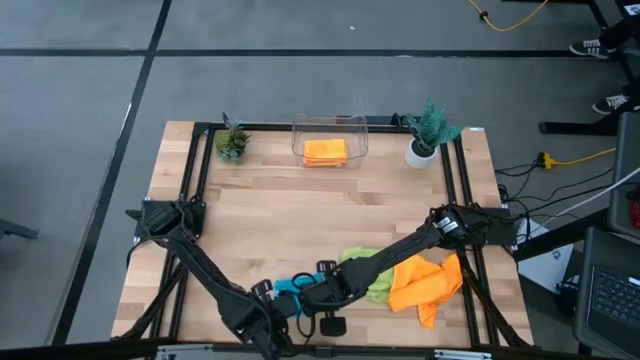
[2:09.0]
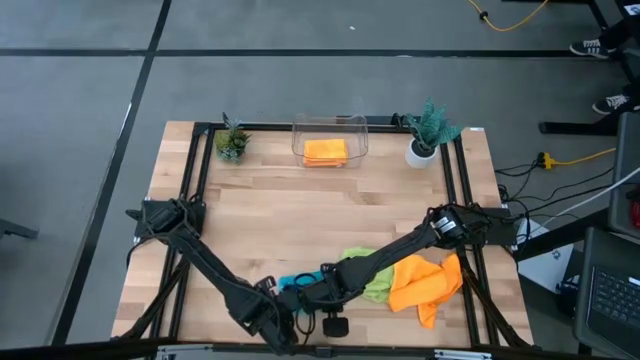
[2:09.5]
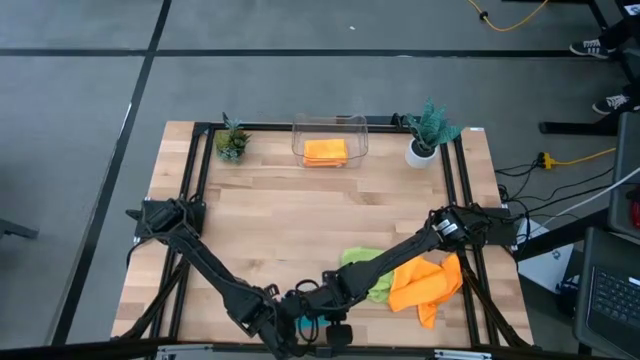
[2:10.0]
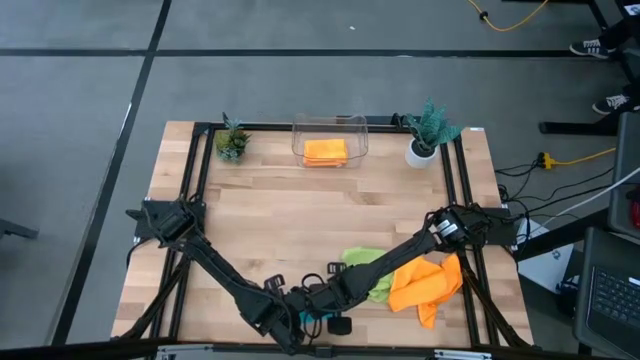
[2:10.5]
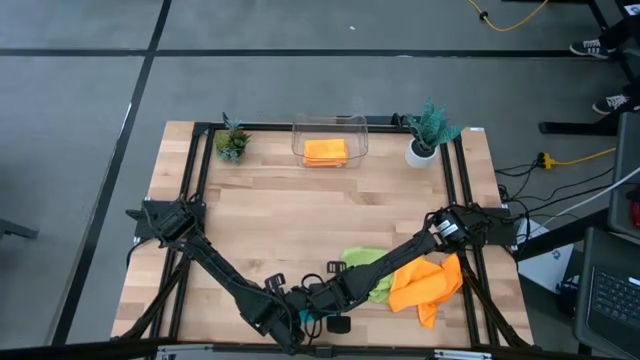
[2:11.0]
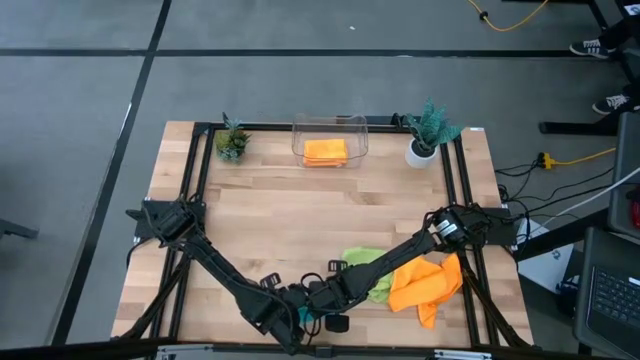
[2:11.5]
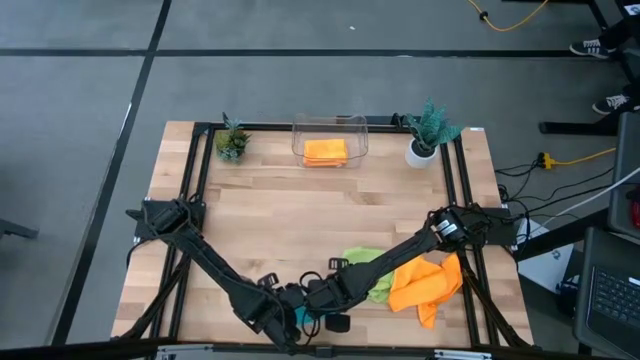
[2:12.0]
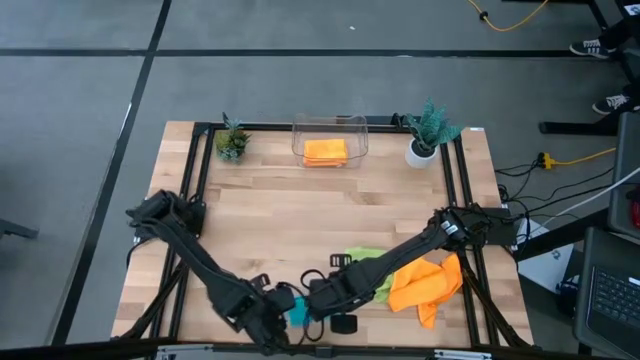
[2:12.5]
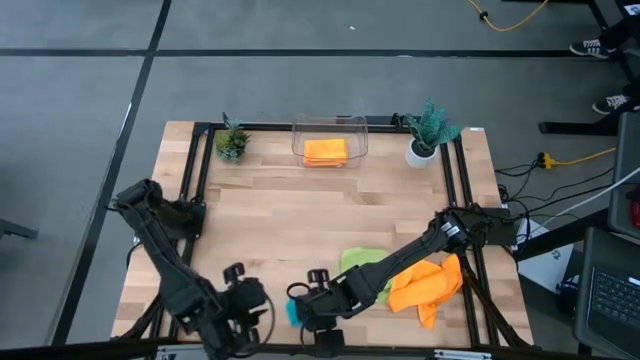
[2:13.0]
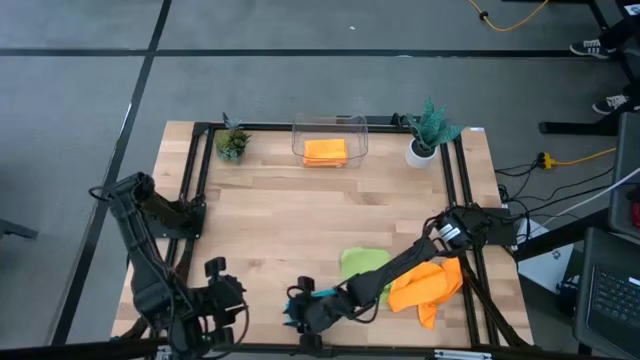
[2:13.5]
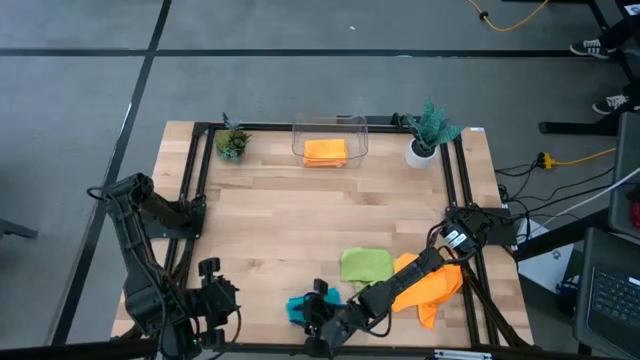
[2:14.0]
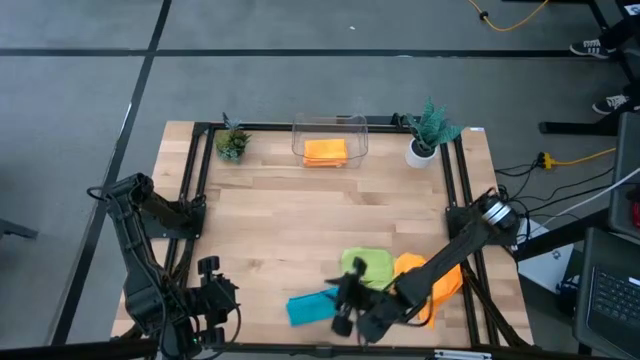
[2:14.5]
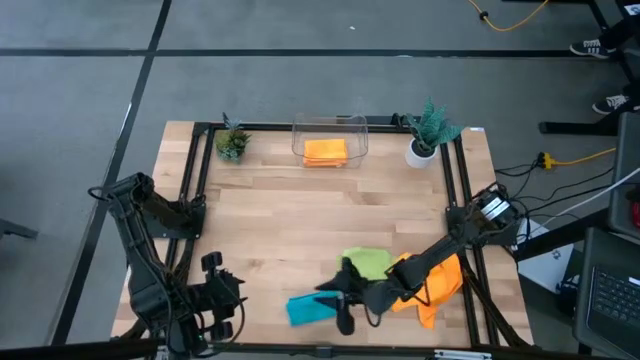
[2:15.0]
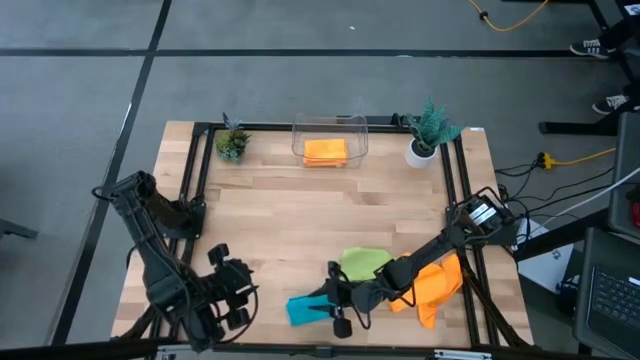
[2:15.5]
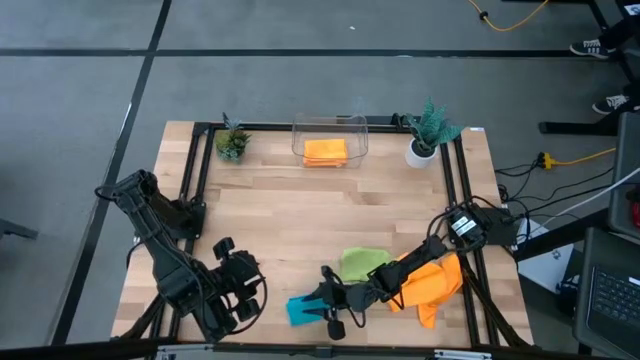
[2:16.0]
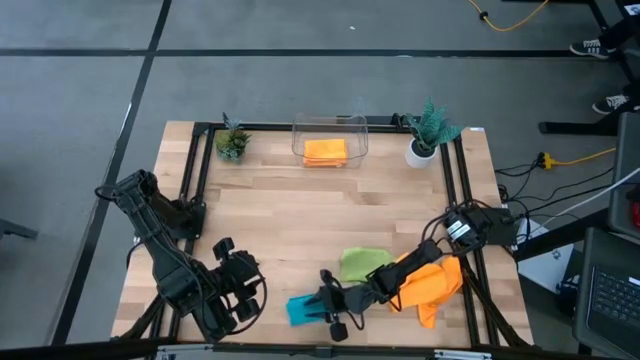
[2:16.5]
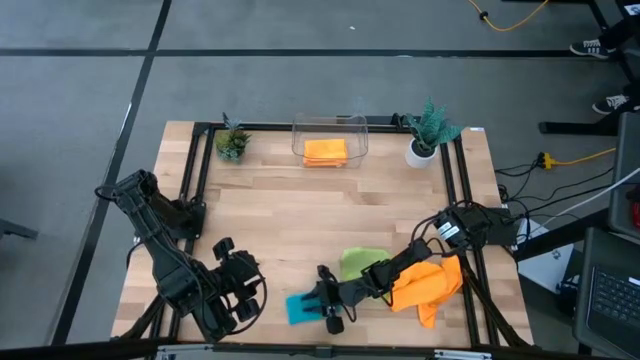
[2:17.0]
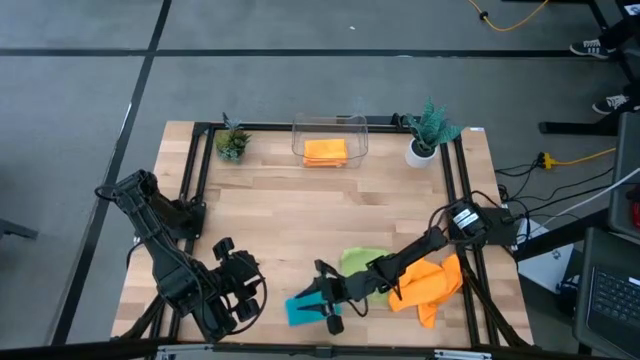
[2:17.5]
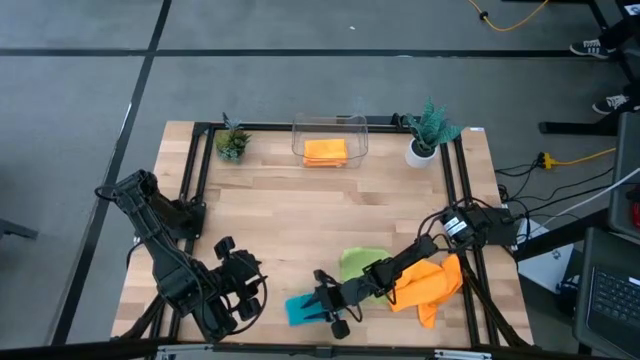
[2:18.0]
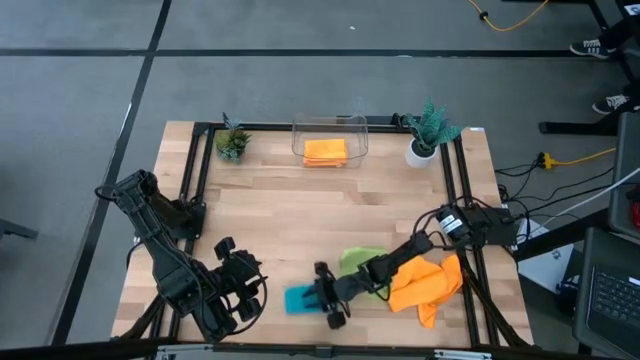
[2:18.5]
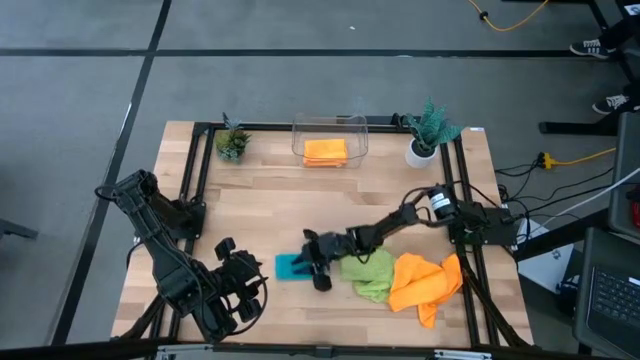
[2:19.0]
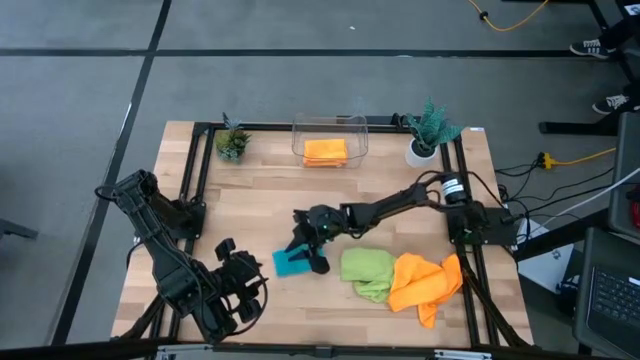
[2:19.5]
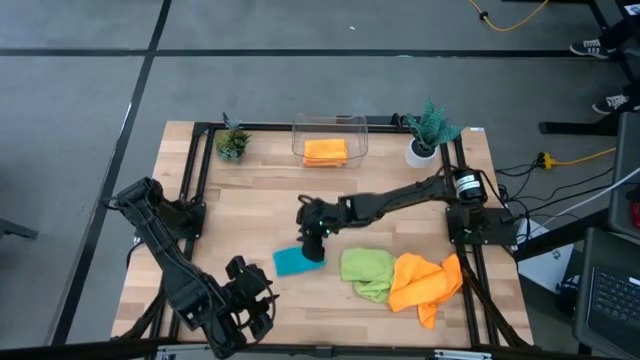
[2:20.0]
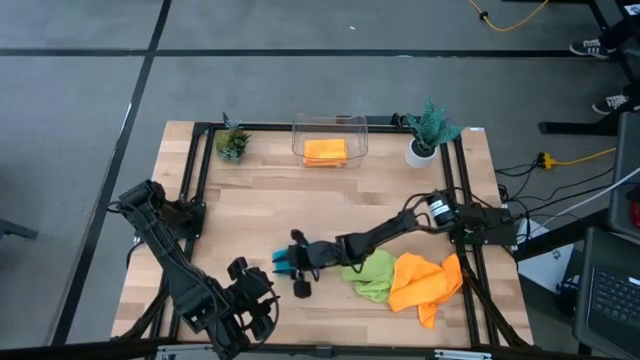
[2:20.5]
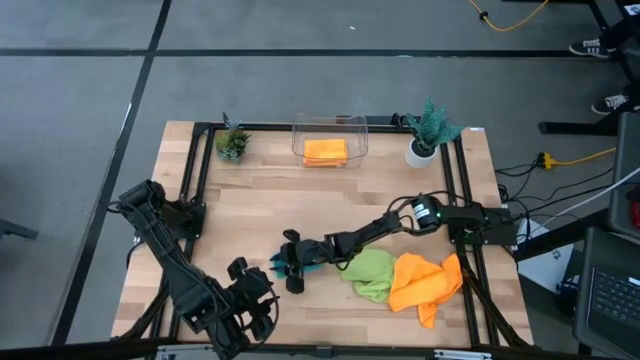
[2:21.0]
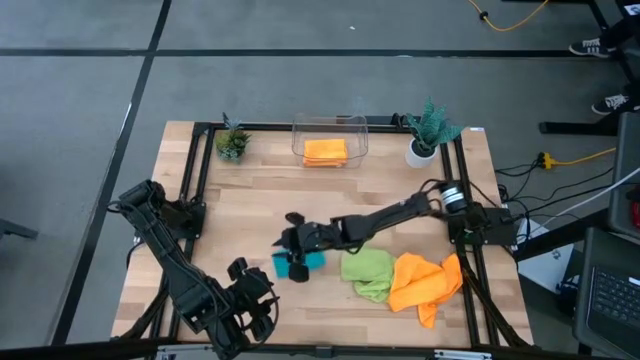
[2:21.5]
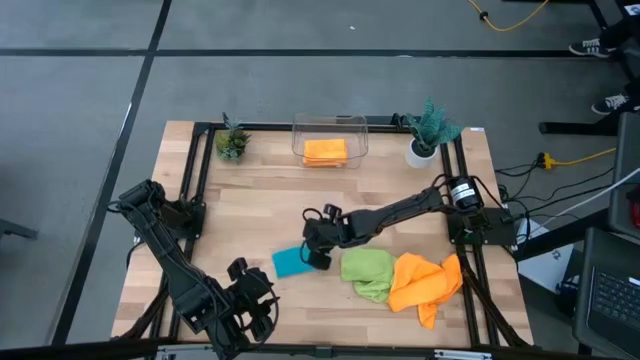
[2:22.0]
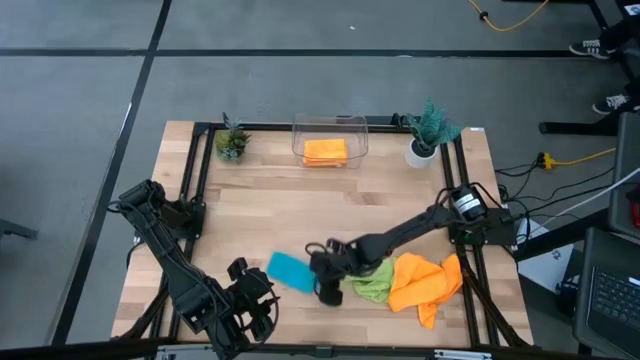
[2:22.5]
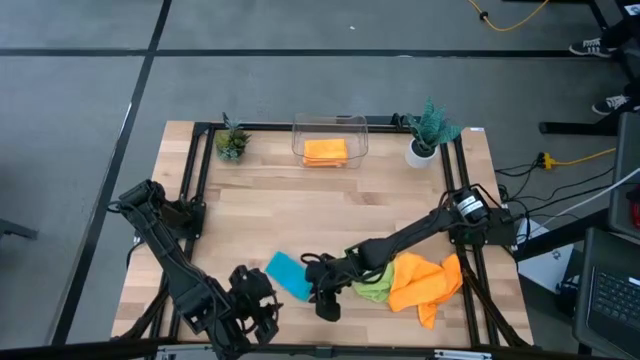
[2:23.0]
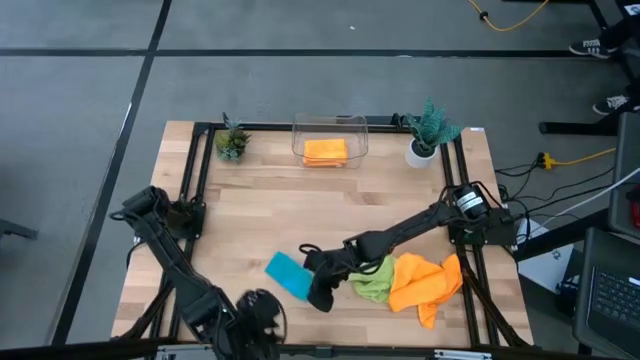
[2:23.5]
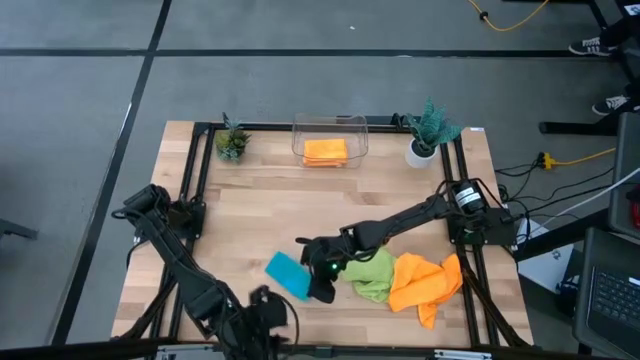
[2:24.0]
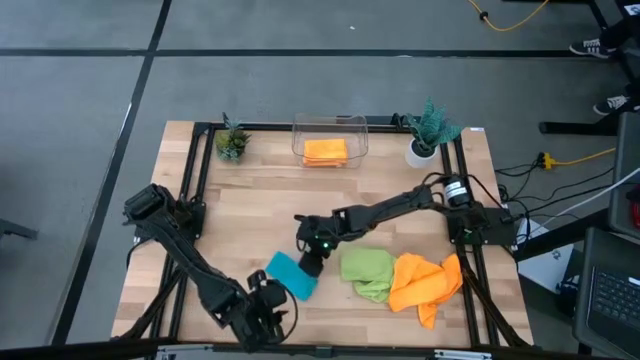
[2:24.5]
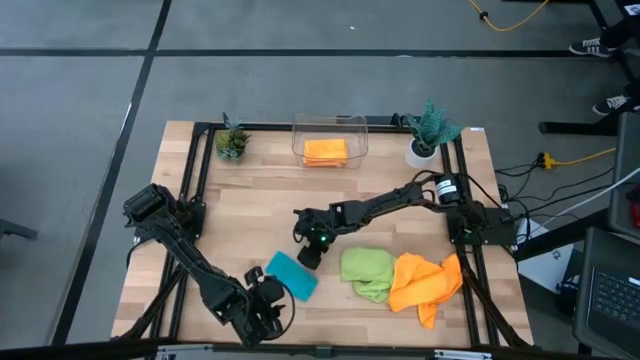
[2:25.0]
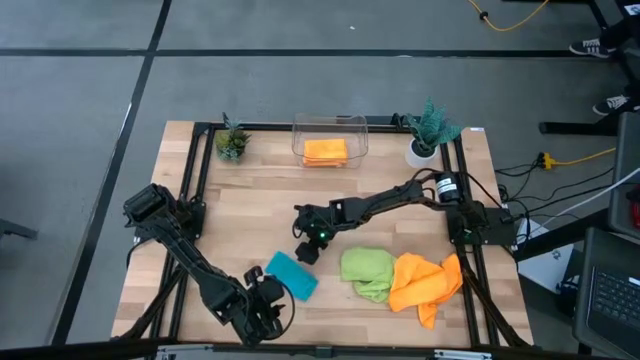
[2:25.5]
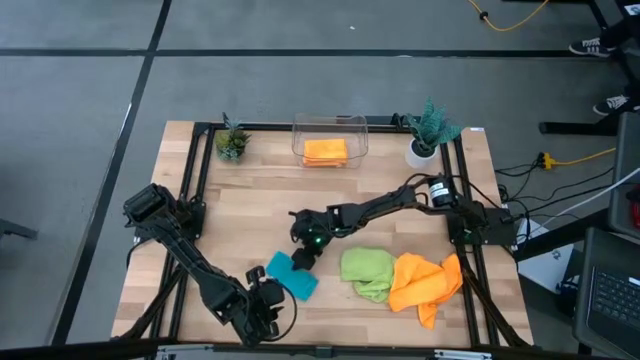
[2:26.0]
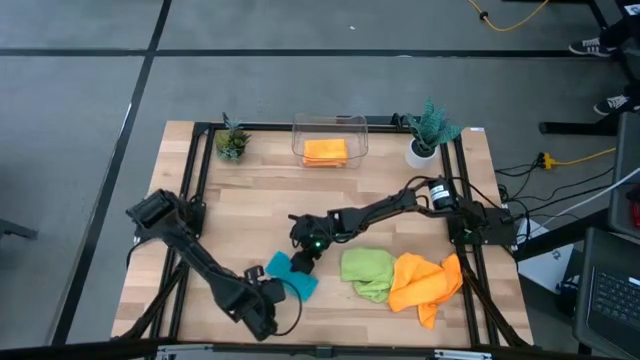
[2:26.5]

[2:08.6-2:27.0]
Task: Fold microfiber towels
Fold the blue towel

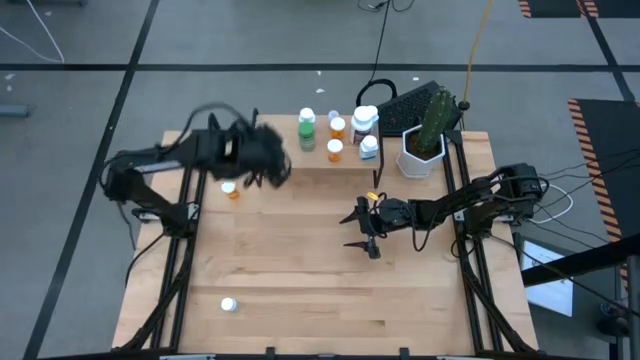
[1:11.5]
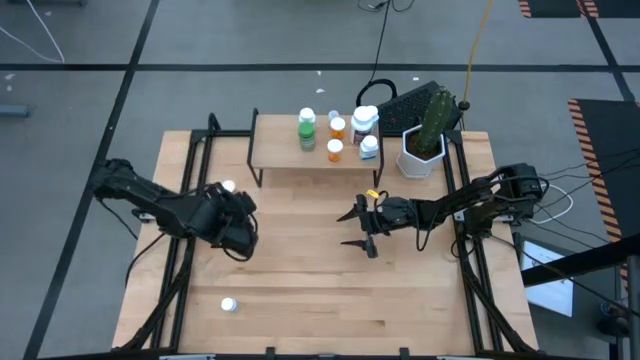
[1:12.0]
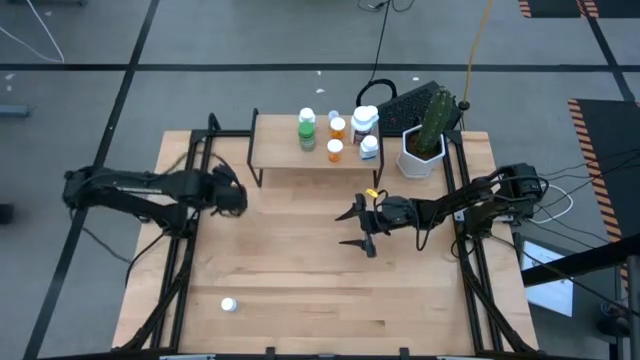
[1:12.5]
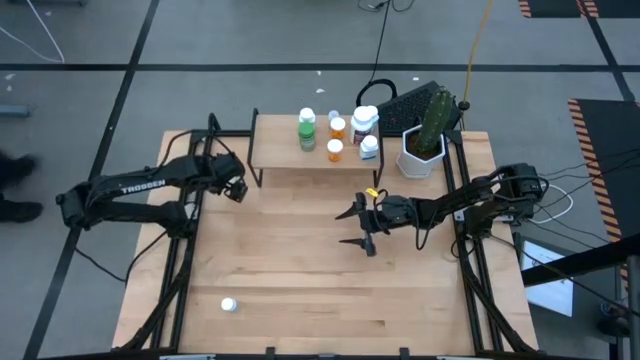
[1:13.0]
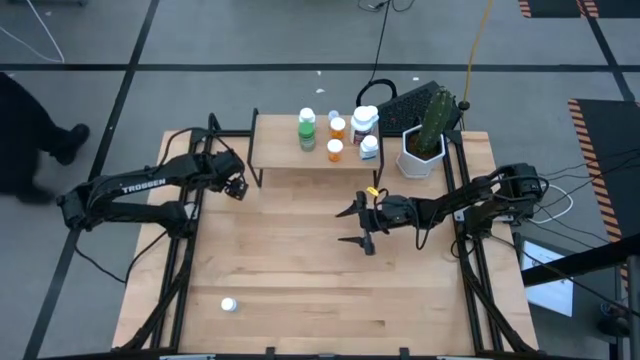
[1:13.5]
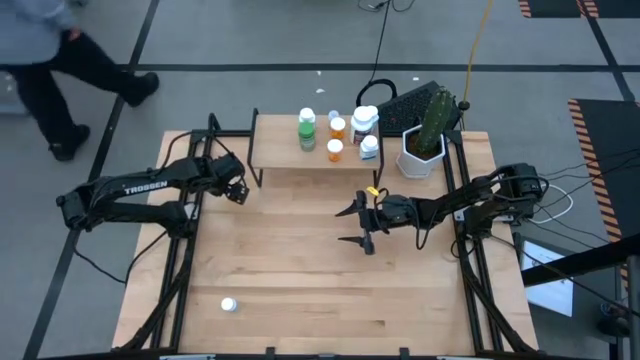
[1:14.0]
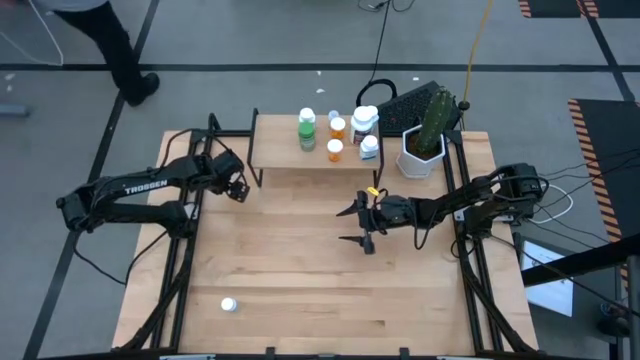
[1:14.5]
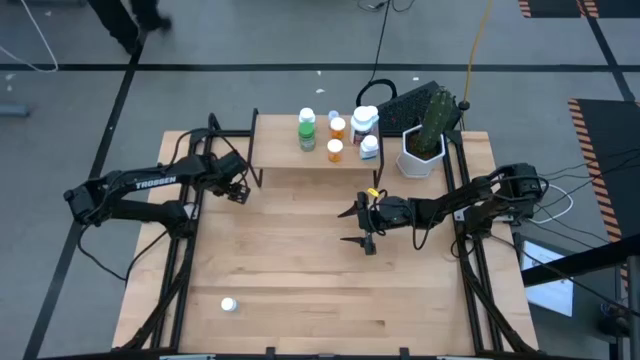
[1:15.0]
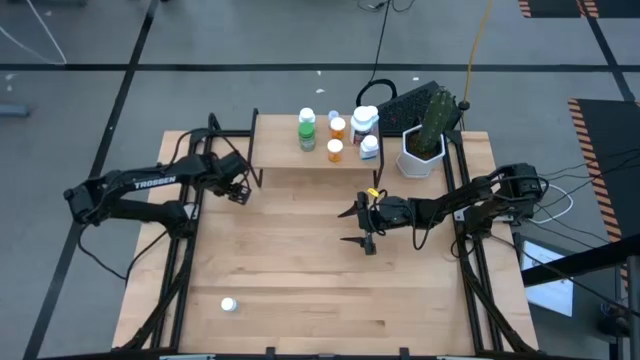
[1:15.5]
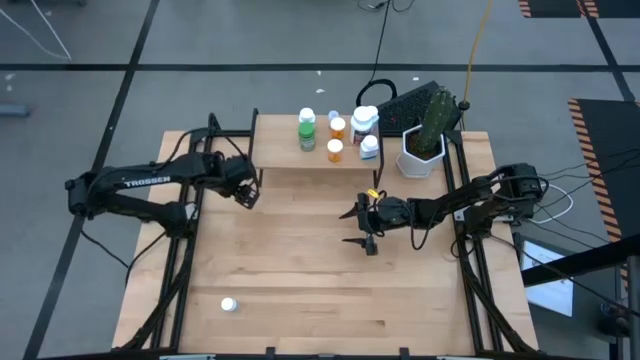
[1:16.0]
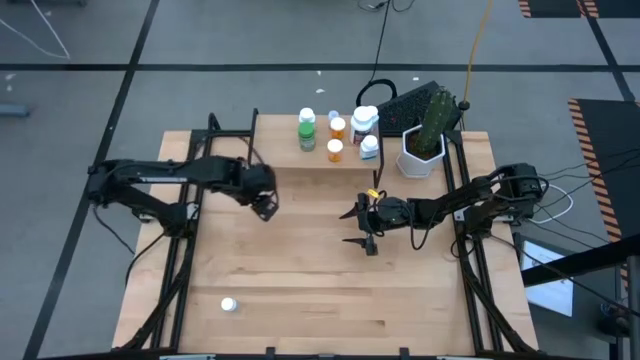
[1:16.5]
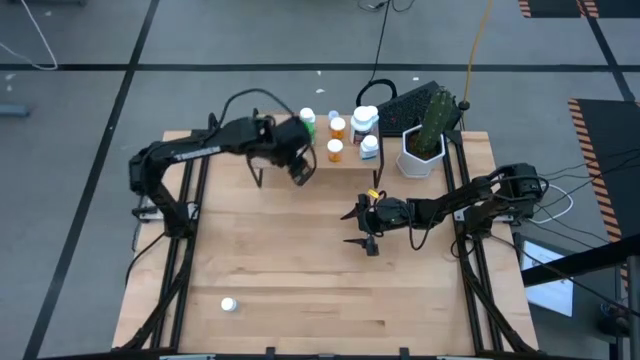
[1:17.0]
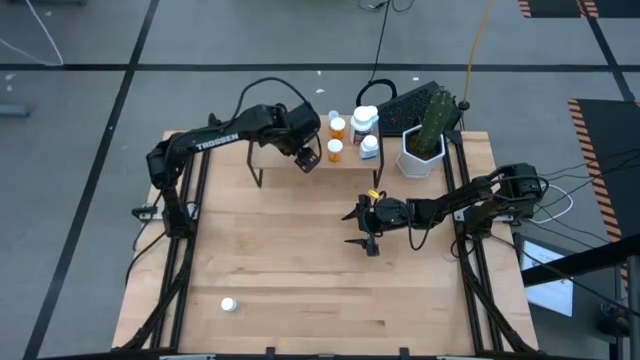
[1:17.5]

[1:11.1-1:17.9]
Task: Pick and place medicine bottles onto shelf by color
Put the orange medicine bottle on the shelf
